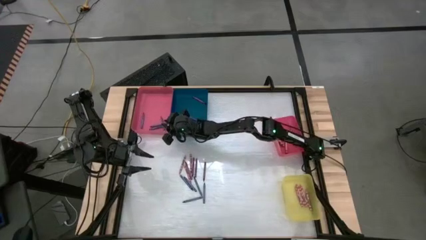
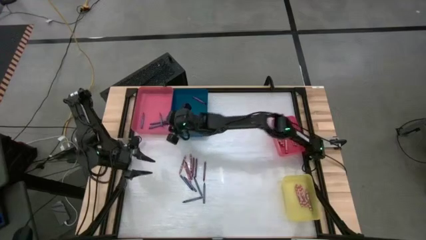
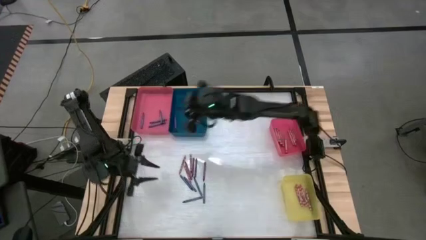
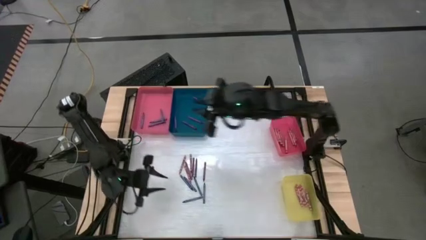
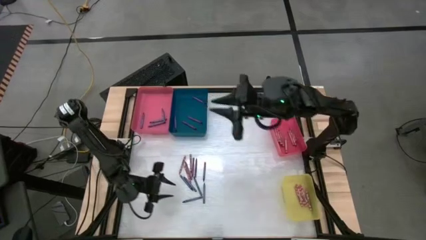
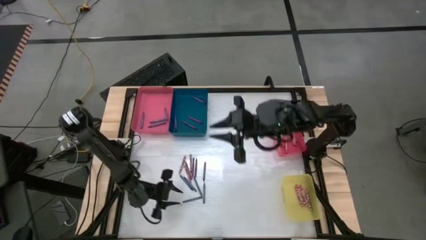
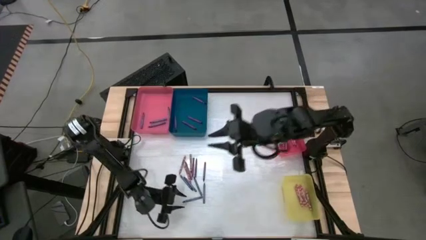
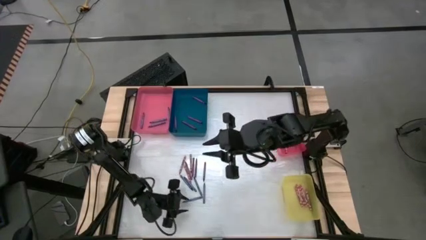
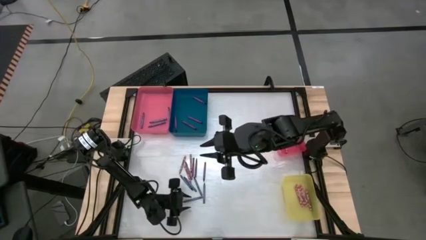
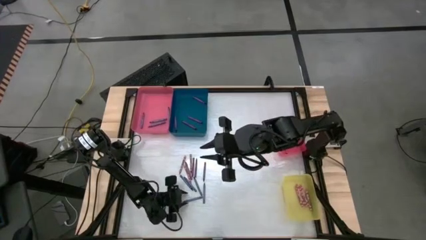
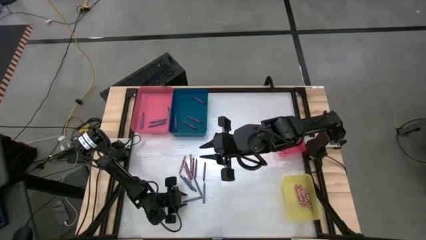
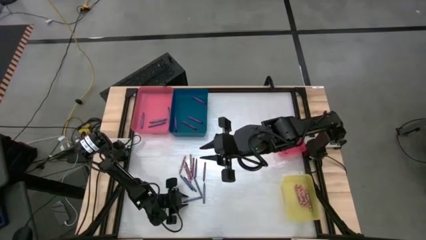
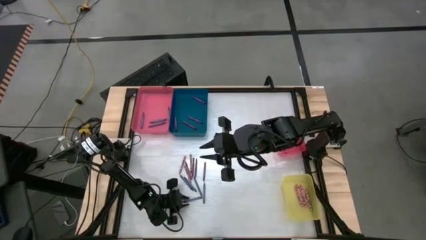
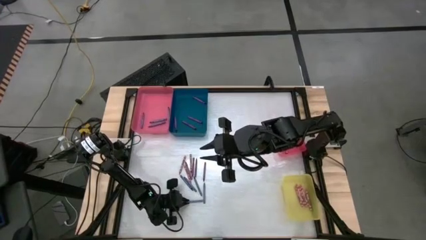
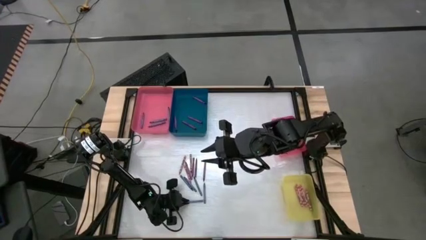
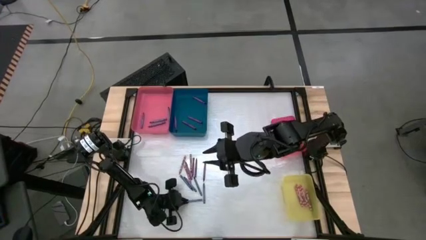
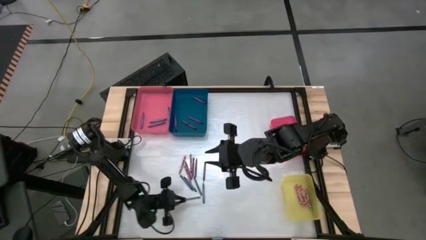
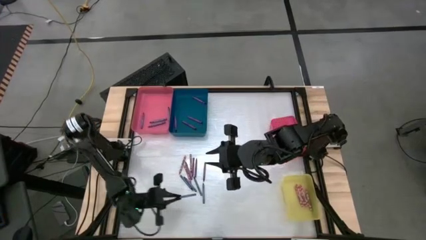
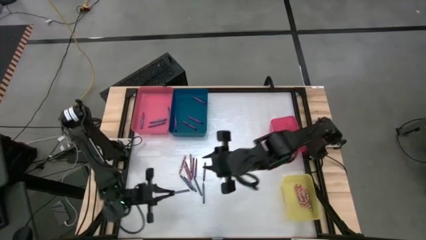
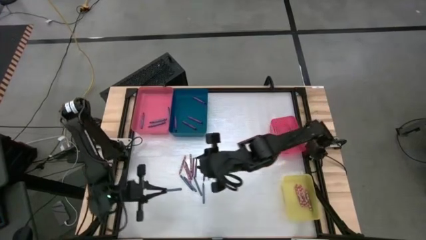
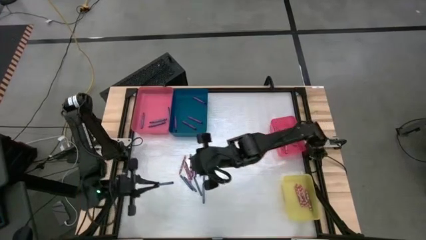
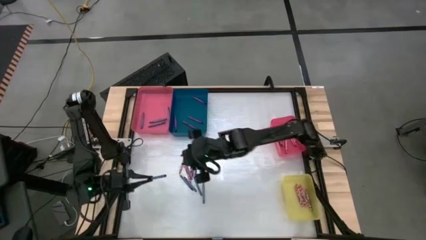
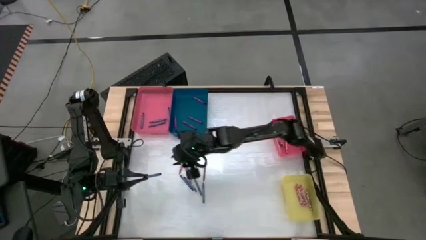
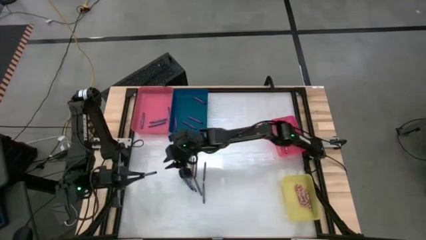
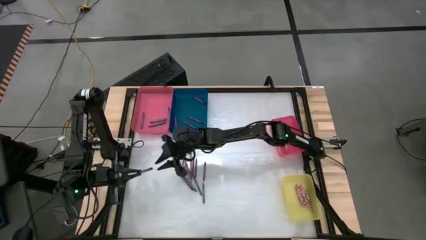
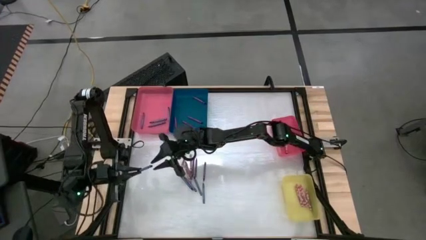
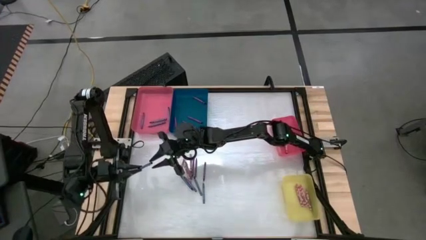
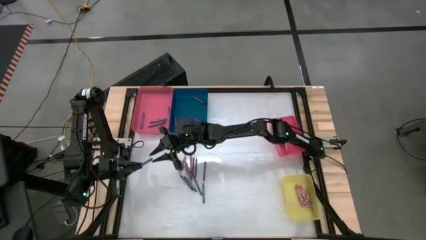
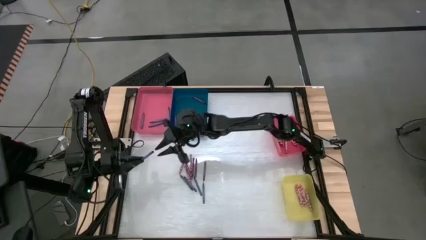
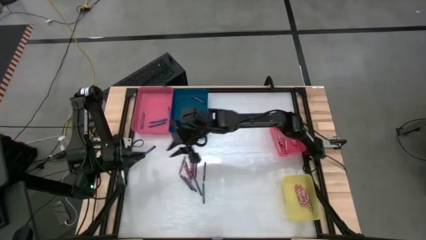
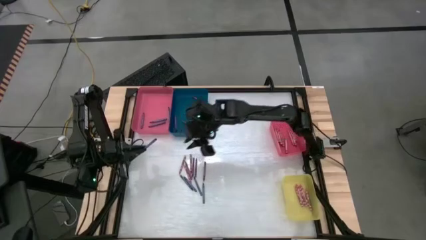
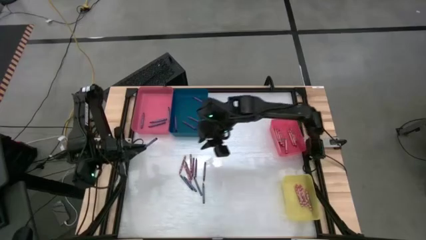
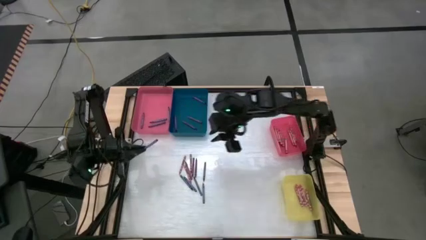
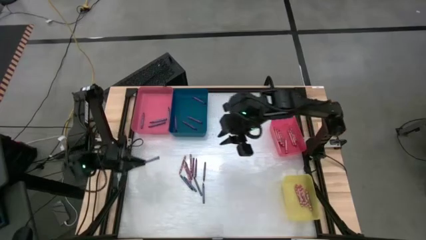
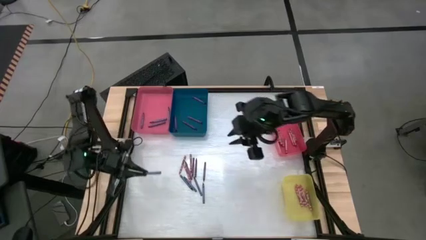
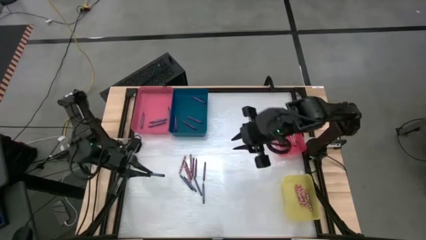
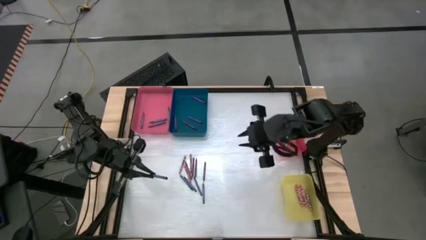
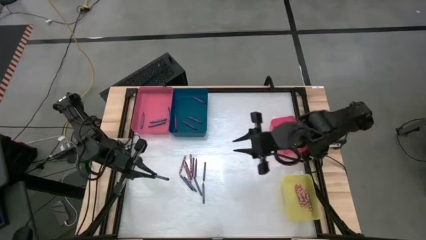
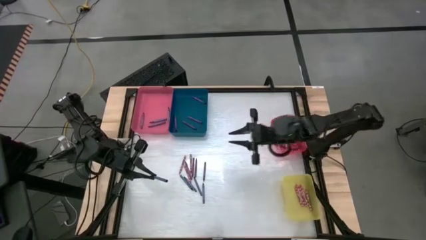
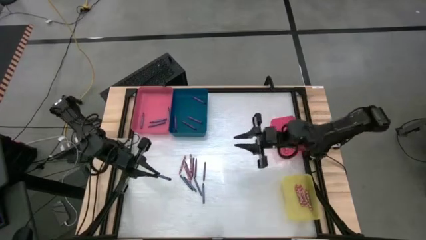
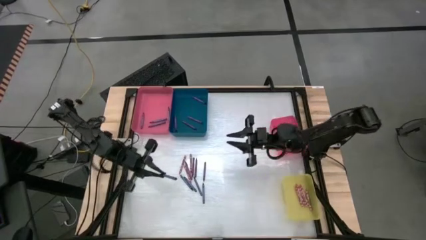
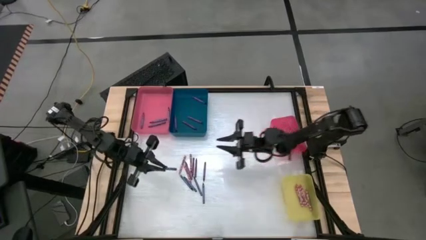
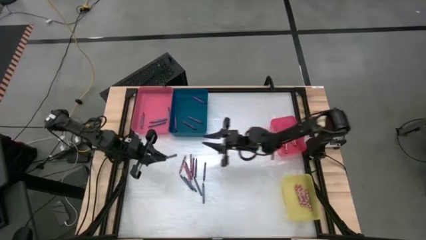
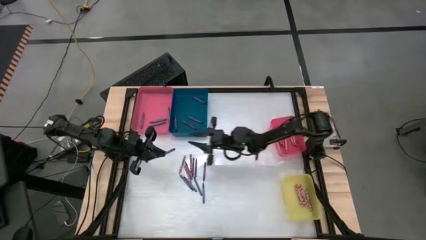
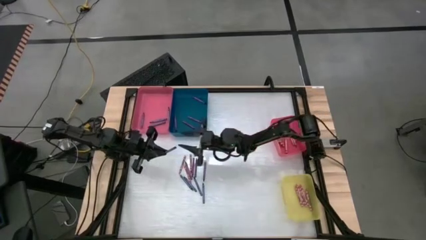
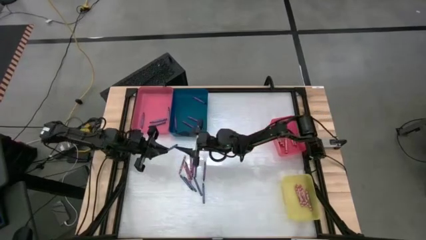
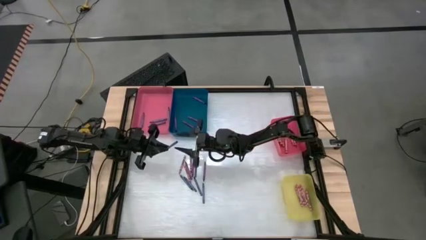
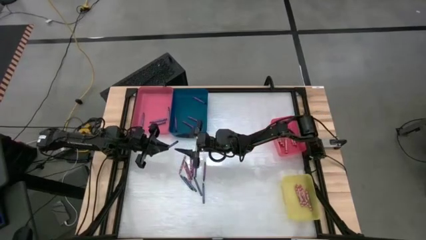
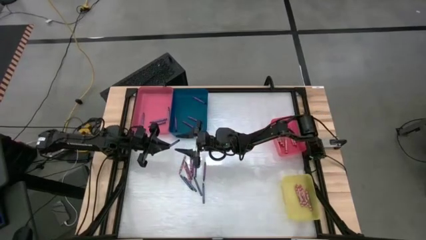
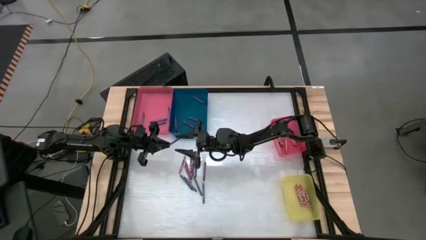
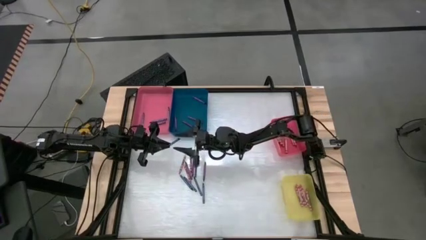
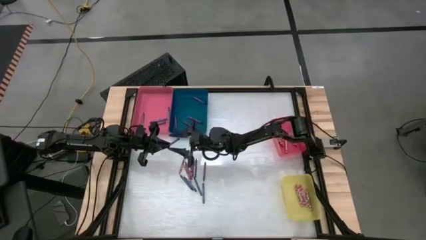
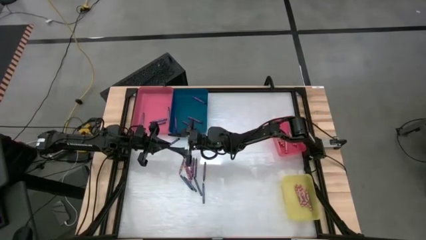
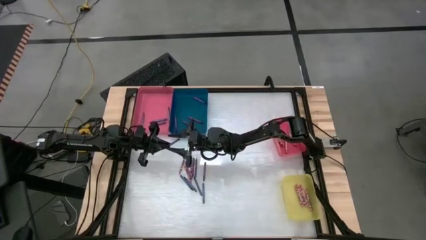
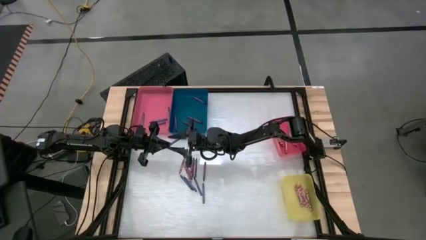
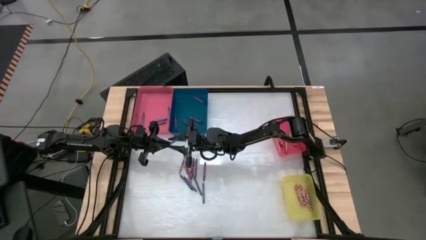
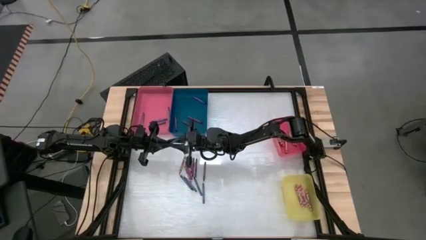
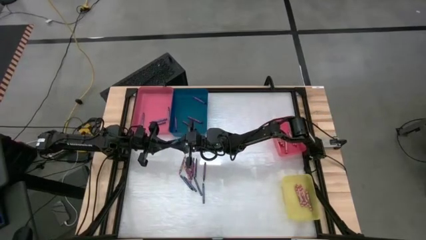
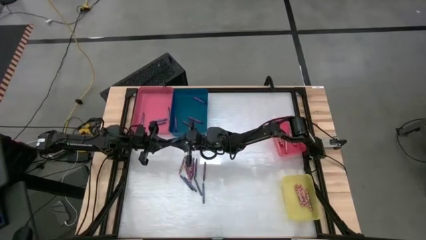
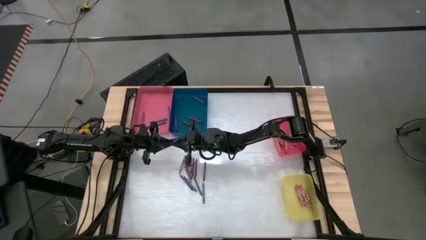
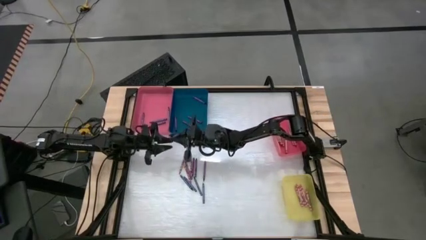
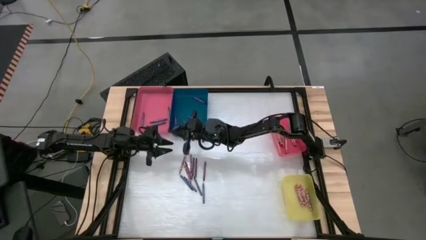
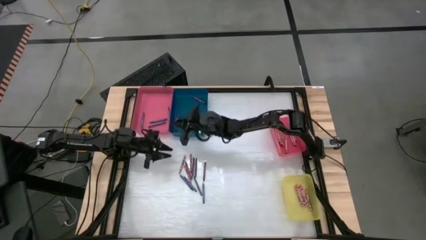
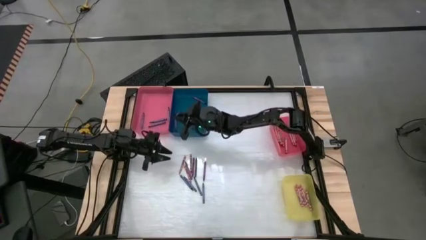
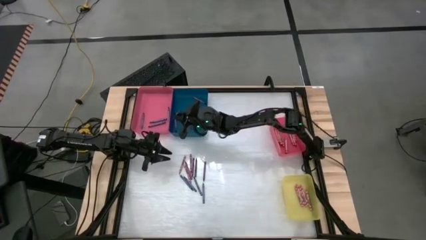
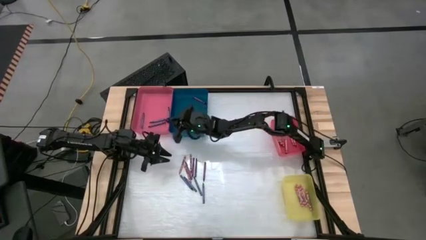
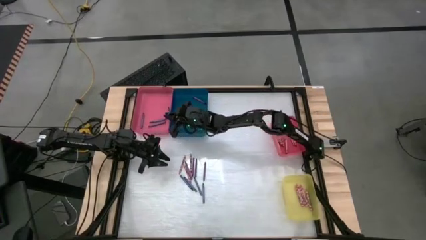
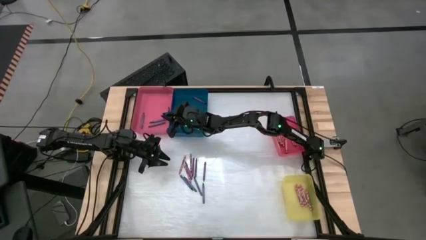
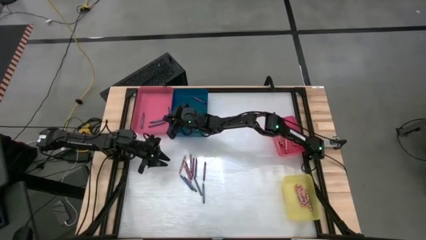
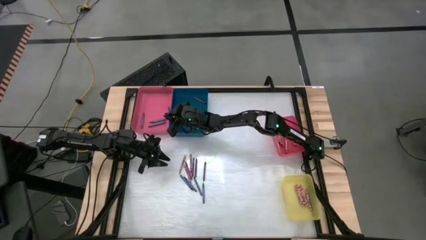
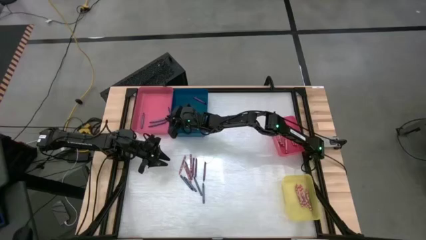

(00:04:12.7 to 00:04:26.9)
Task: Sort crayons
Put the blue crayon into the large red bin
